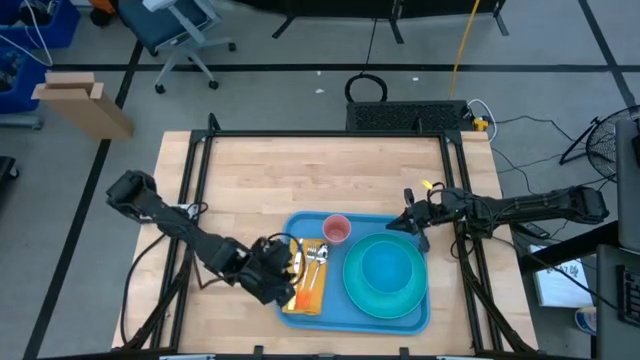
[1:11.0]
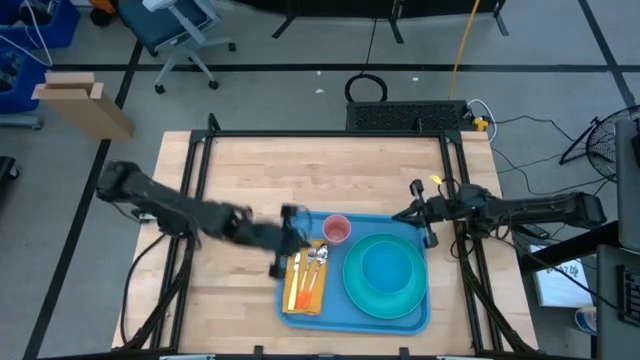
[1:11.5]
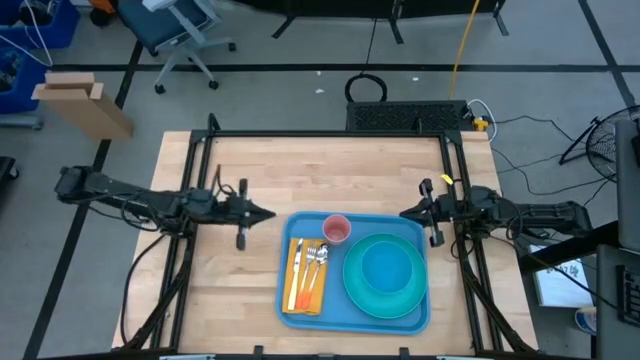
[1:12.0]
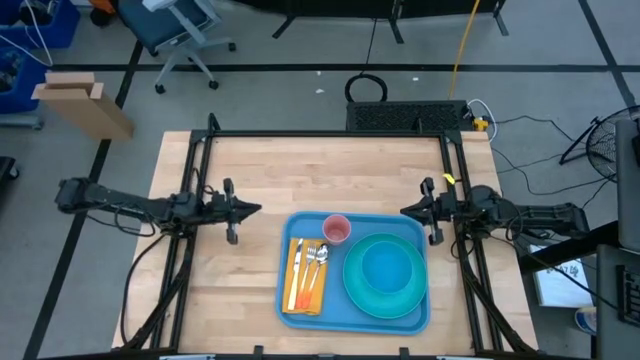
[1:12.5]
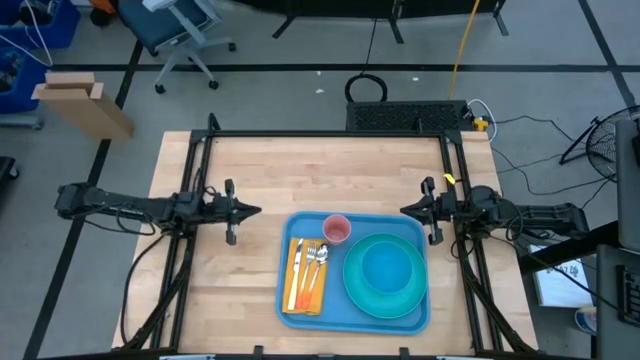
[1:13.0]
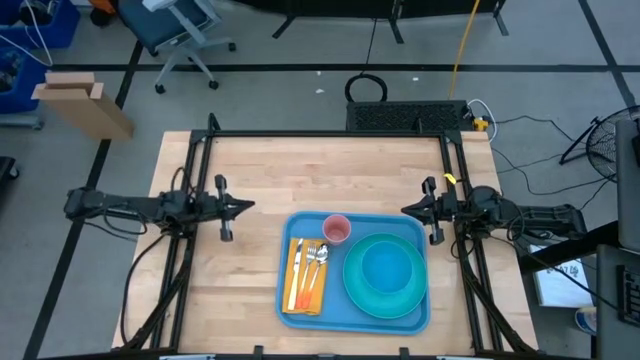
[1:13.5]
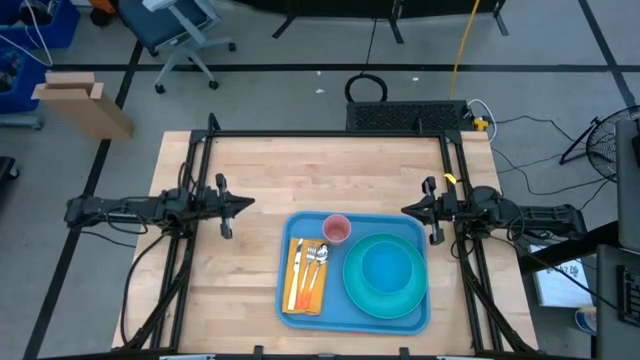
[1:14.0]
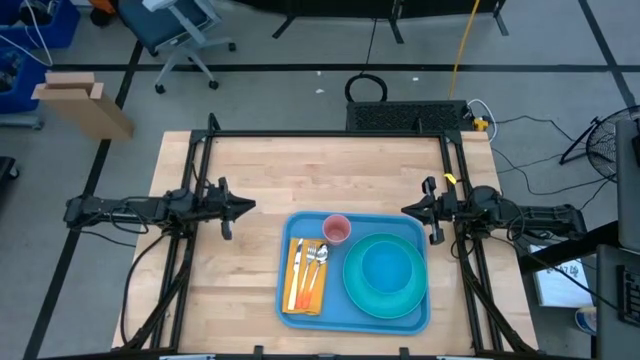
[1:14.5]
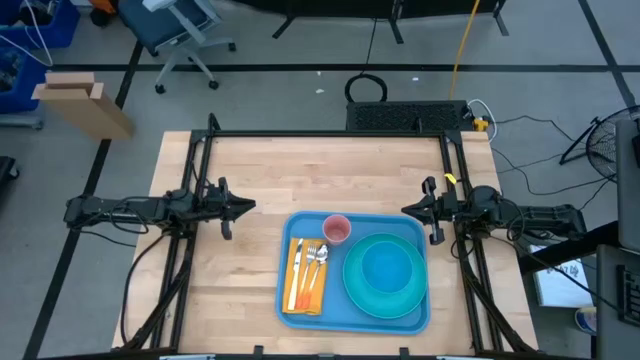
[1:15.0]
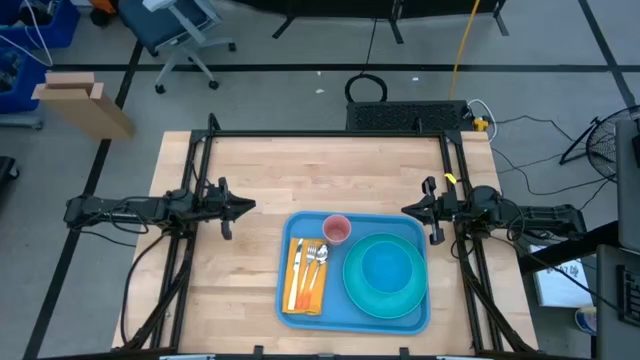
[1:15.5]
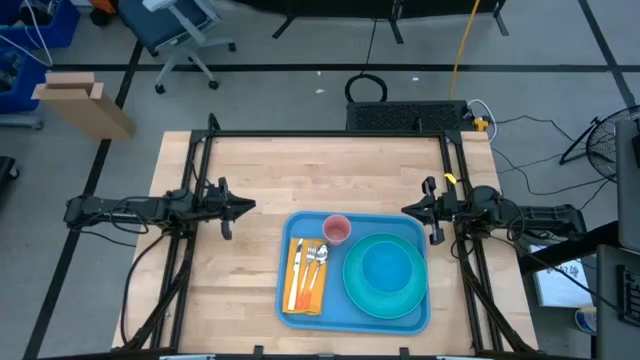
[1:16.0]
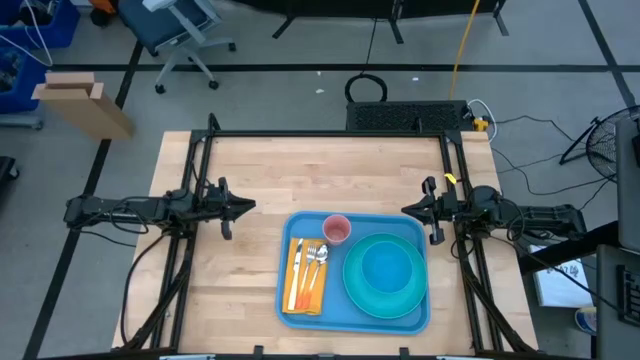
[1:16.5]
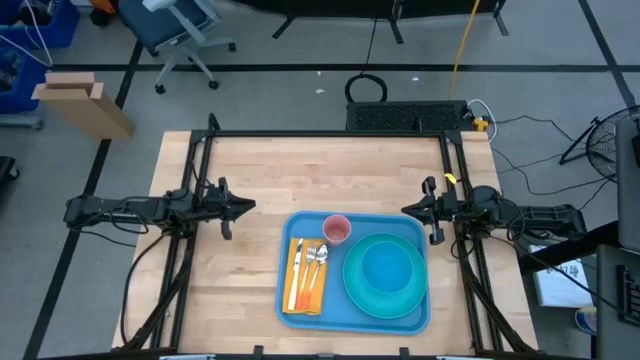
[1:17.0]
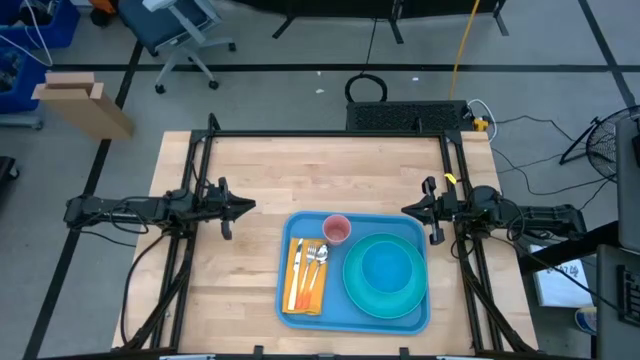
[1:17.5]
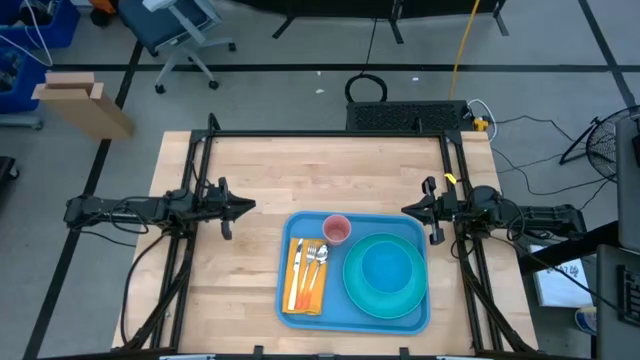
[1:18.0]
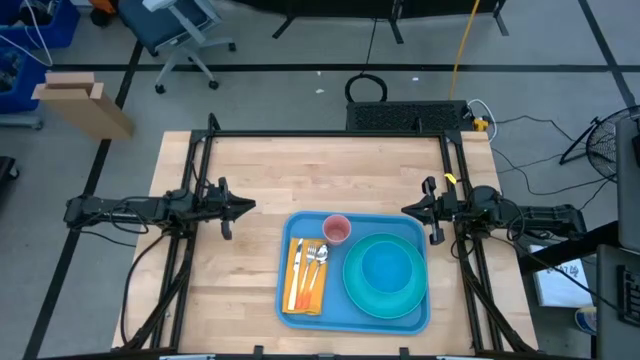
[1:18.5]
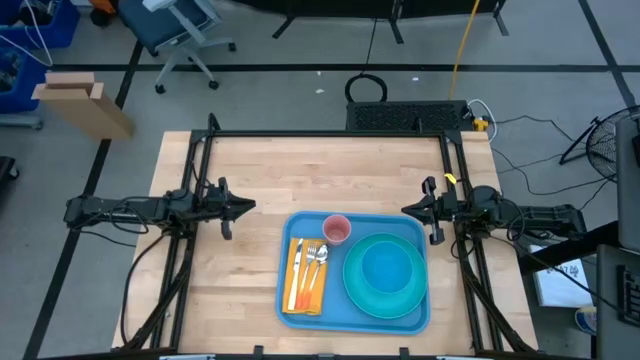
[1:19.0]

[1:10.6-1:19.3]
Task: Set up tray
Return to Home Position

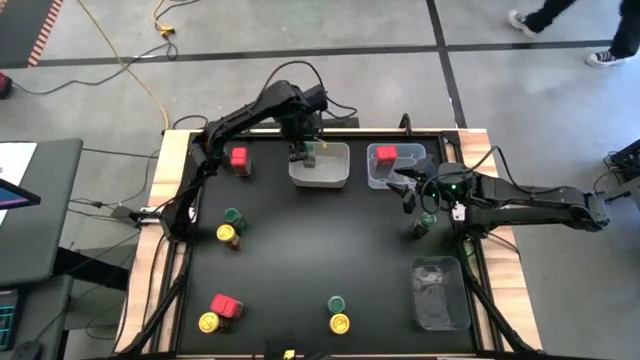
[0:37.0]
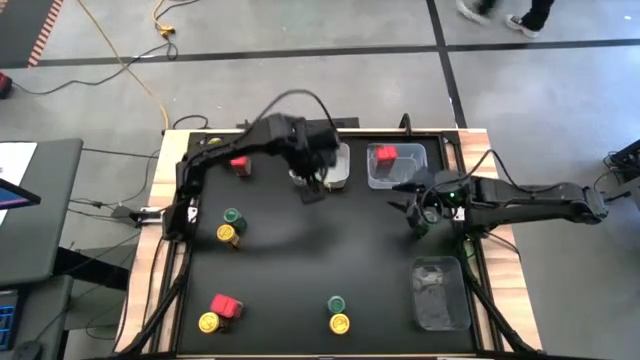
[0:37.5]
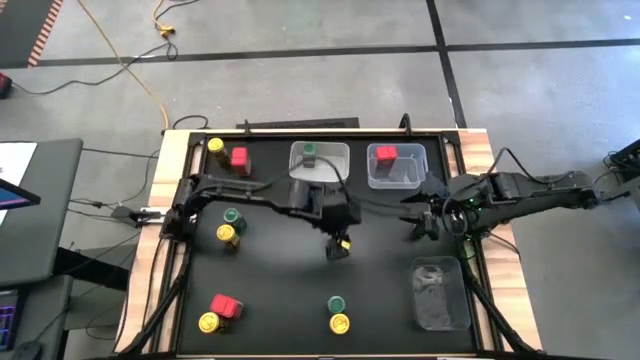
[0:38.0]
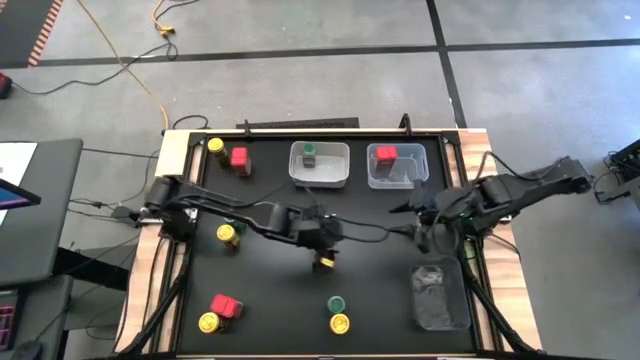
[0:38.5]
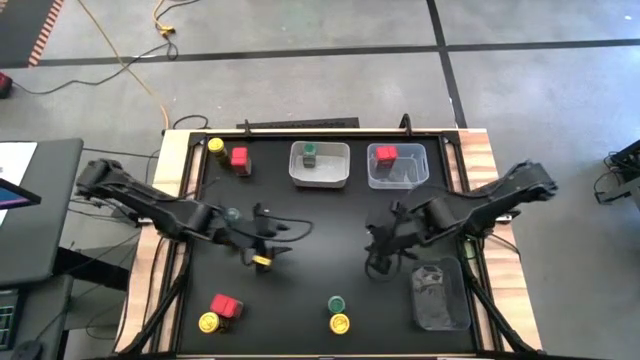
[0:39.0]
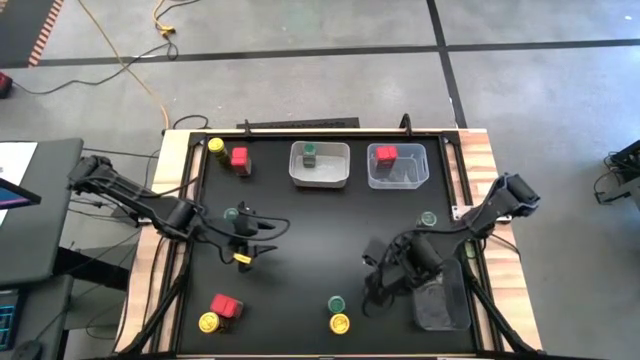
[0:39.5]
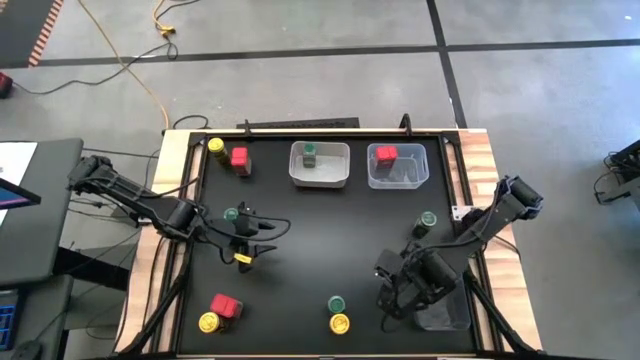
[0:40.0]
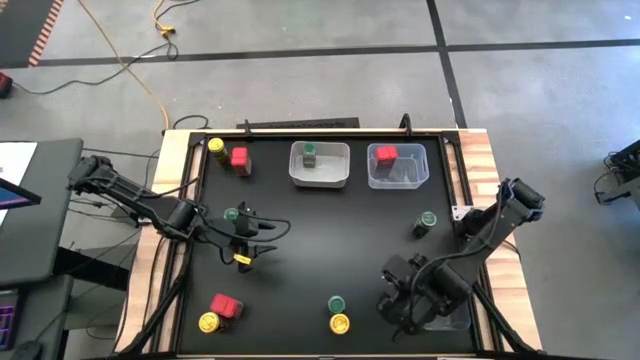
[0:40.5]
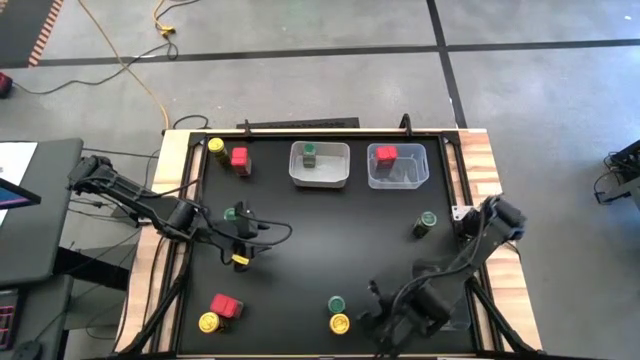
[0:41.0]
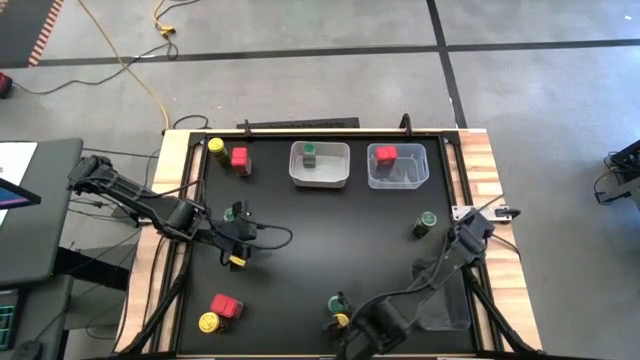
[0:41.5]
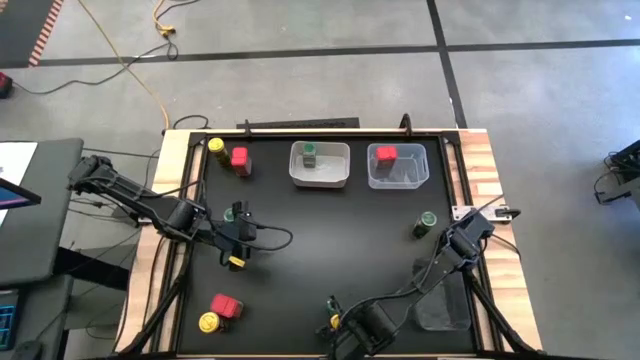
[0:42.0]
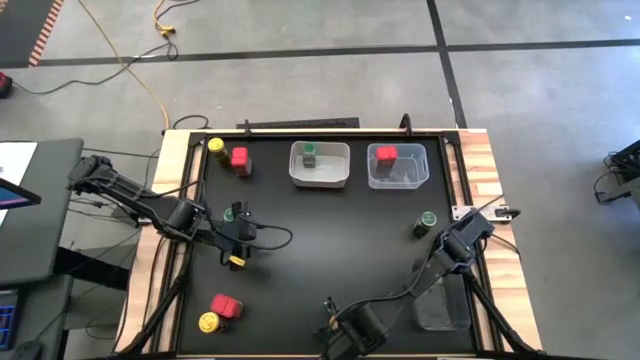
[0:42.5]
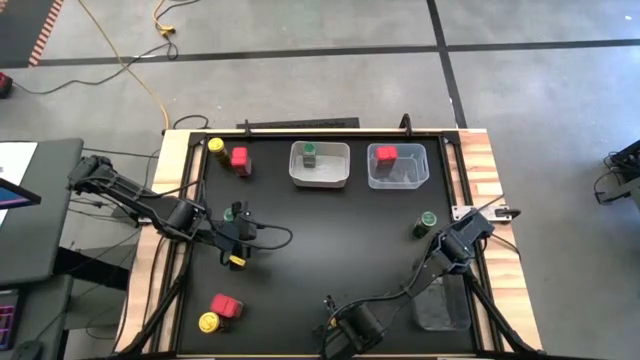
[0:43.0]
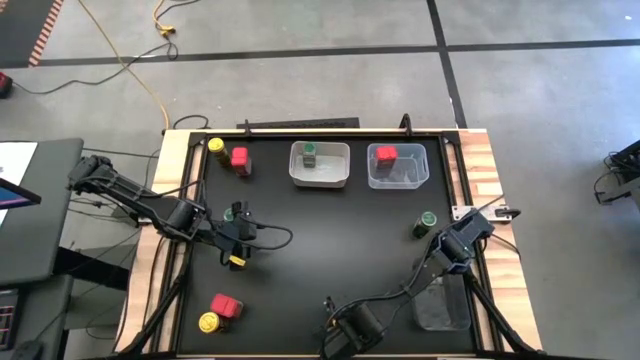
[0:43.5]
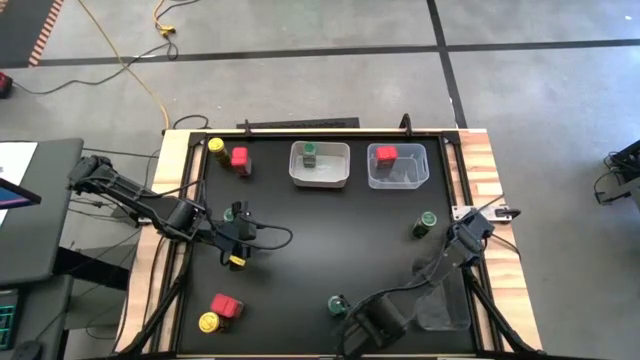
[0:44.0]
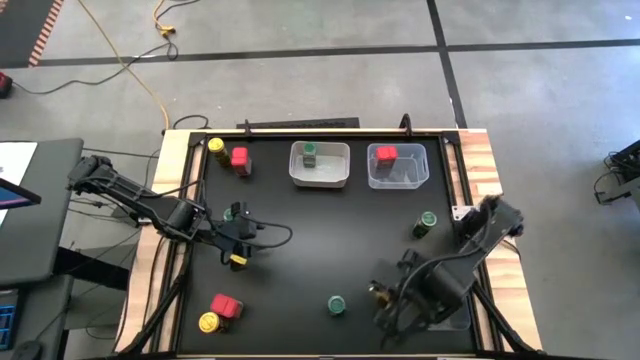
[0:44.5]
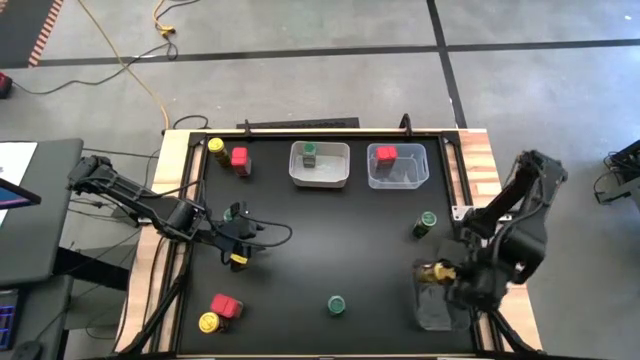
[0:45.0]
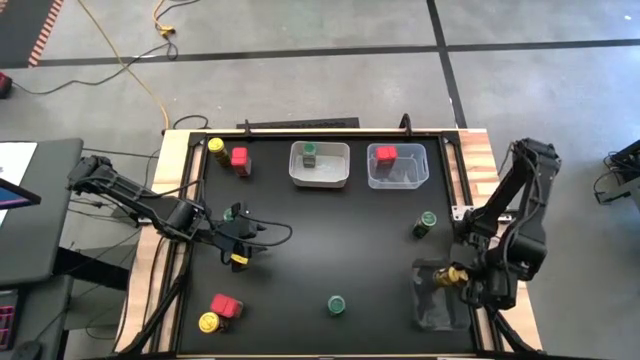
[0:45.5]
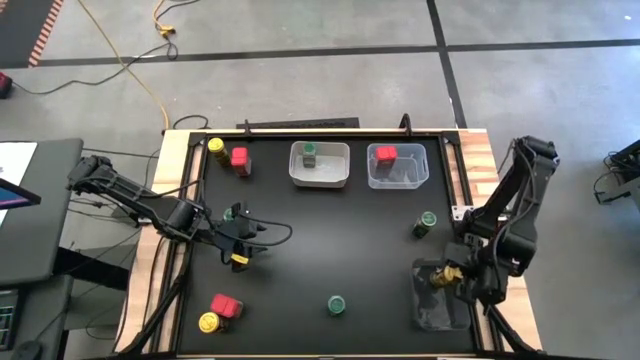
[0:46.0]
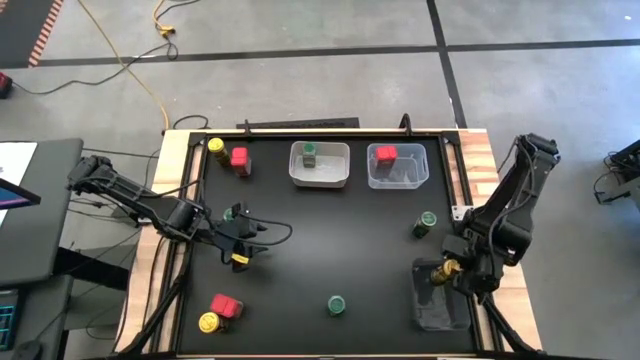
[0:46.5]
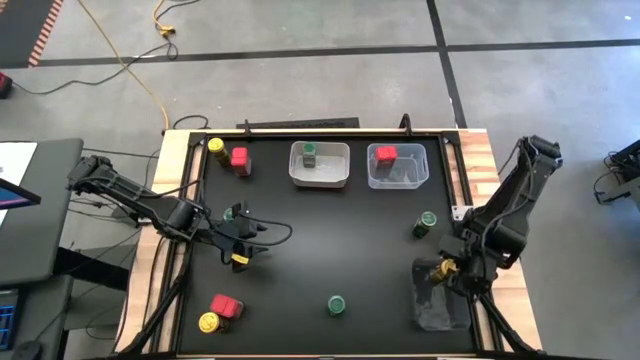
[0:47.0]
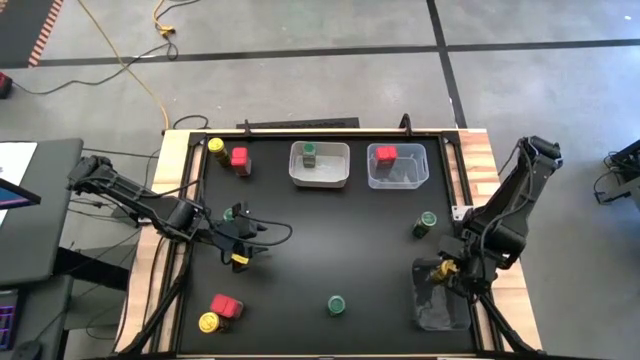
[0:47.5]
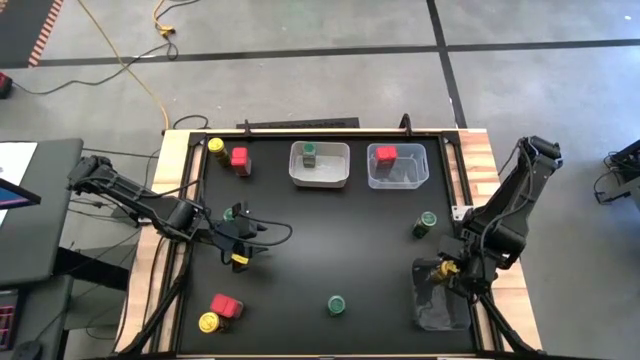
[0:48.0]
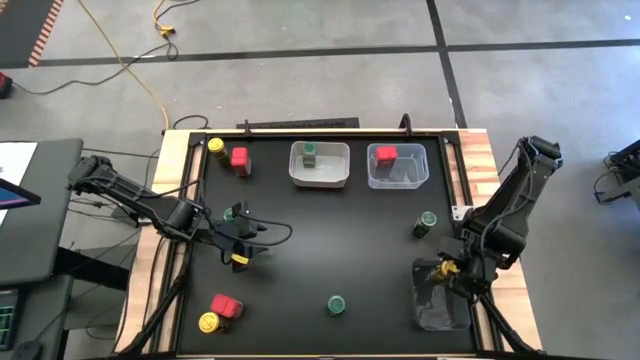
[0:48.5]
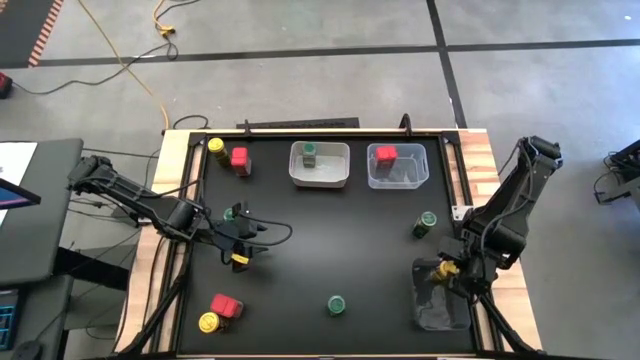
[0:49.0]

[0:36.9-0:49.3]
Task: Sort spices by type
Put the right yellow seasoning bottle into the black bin
